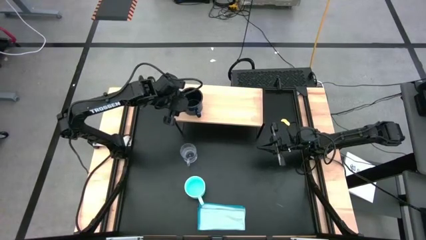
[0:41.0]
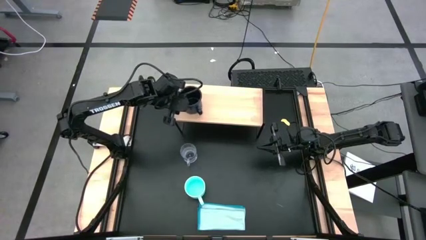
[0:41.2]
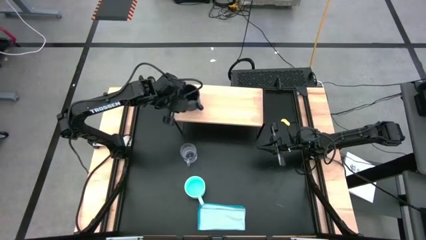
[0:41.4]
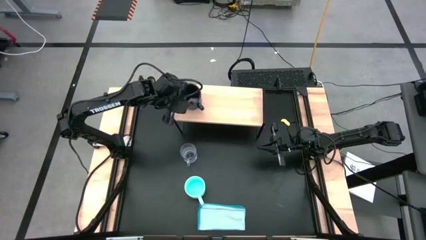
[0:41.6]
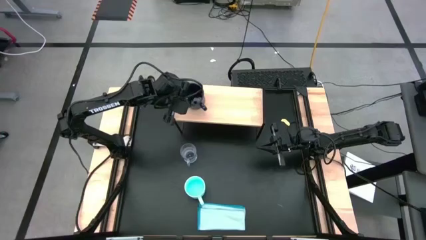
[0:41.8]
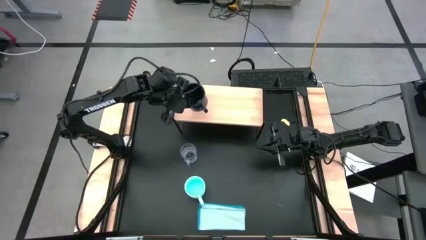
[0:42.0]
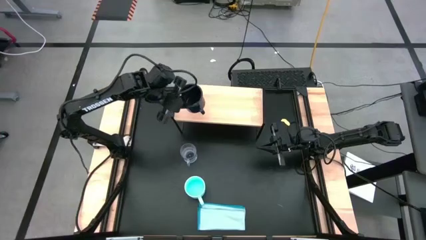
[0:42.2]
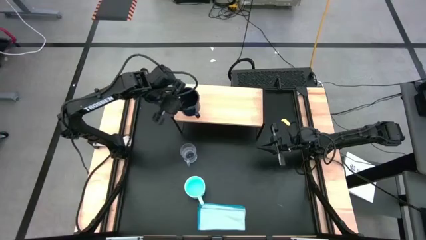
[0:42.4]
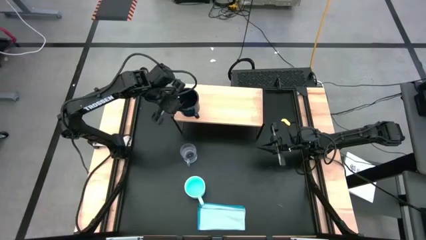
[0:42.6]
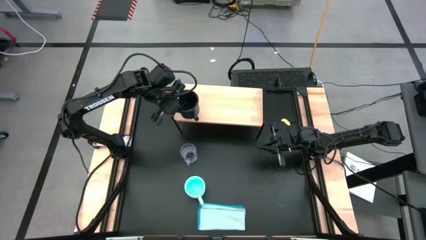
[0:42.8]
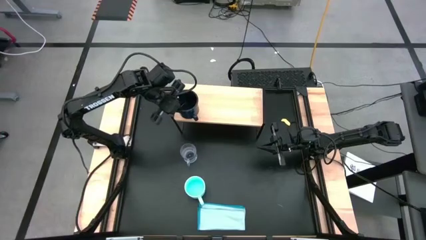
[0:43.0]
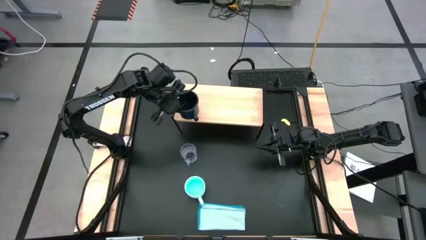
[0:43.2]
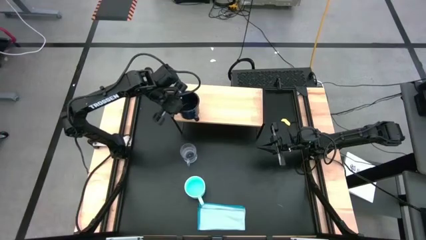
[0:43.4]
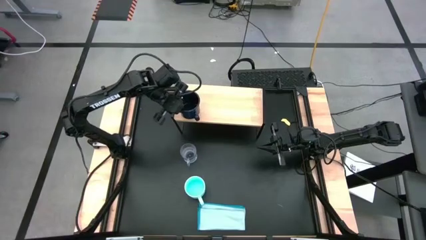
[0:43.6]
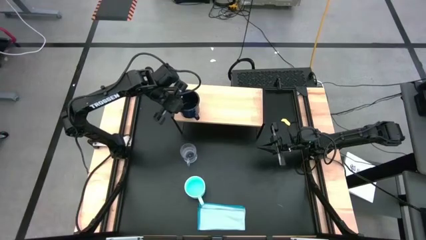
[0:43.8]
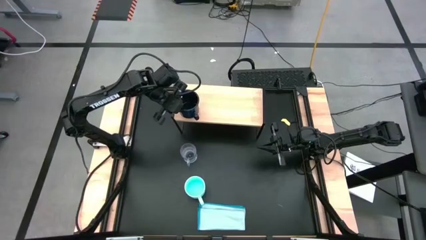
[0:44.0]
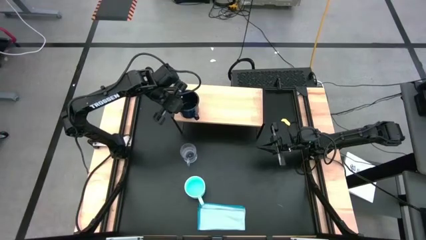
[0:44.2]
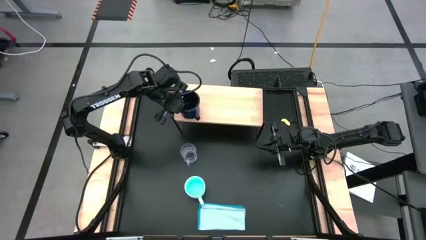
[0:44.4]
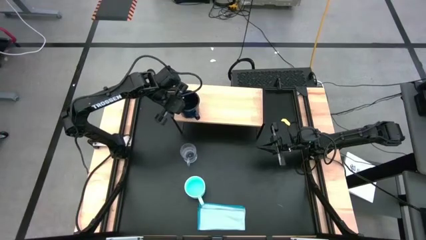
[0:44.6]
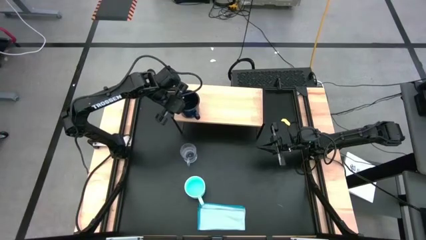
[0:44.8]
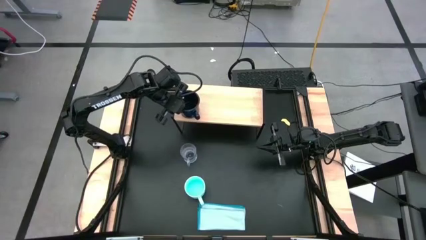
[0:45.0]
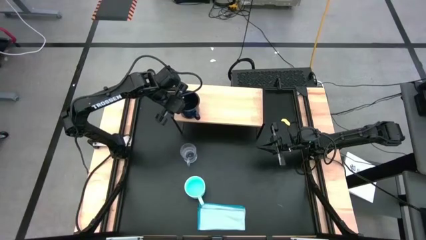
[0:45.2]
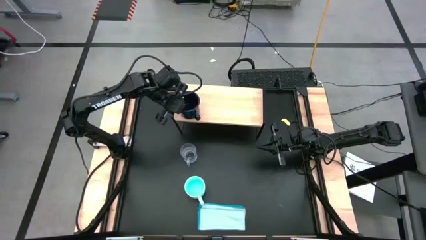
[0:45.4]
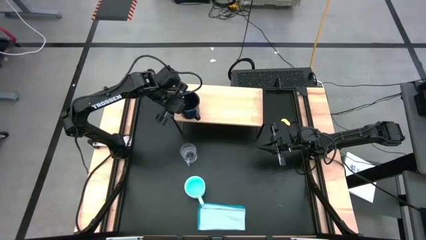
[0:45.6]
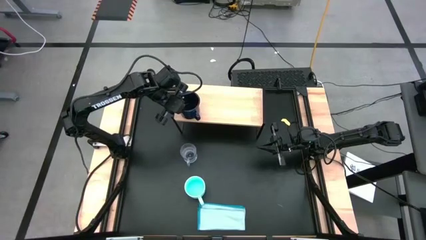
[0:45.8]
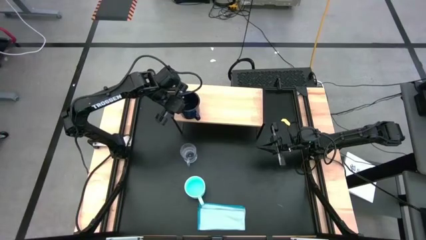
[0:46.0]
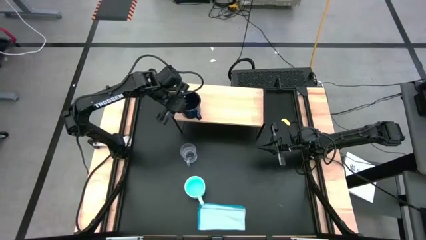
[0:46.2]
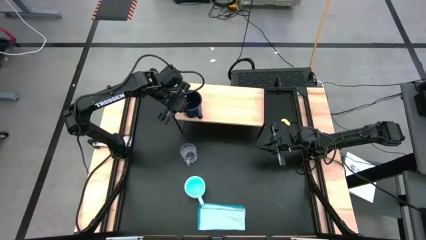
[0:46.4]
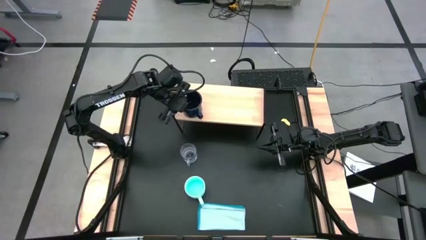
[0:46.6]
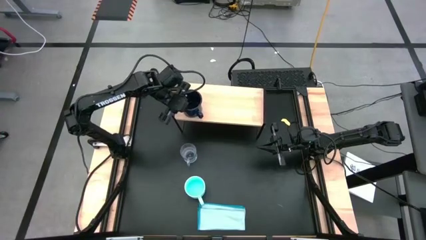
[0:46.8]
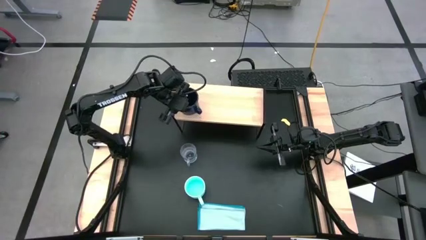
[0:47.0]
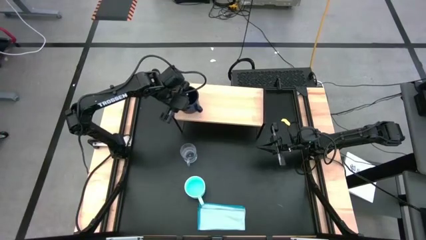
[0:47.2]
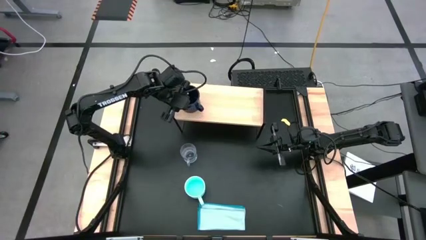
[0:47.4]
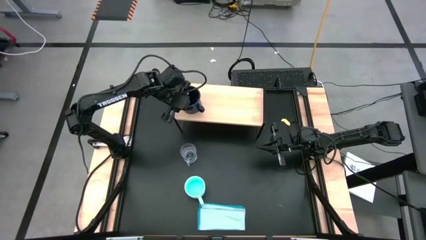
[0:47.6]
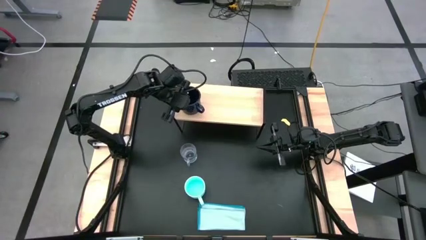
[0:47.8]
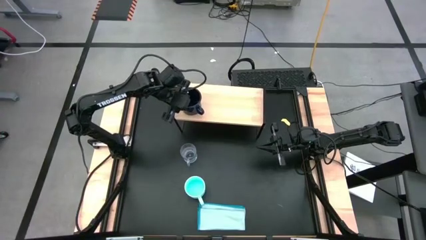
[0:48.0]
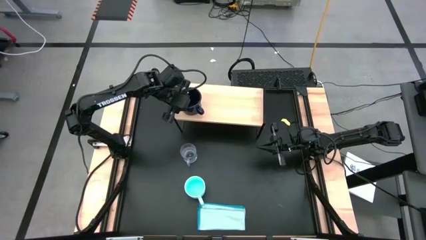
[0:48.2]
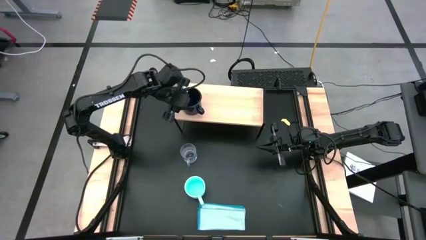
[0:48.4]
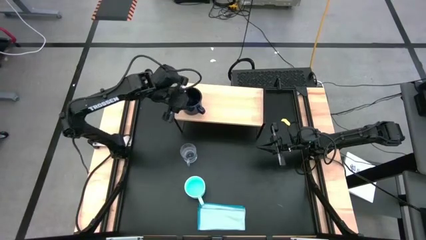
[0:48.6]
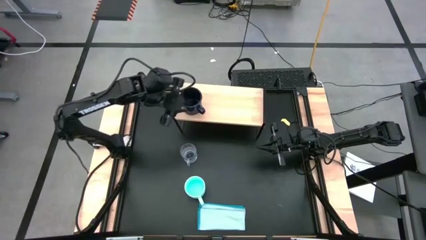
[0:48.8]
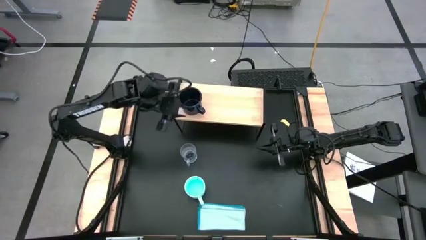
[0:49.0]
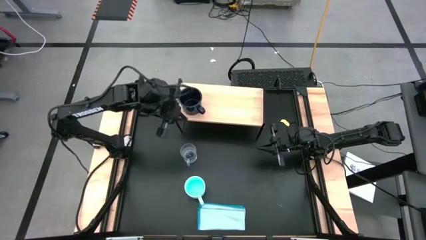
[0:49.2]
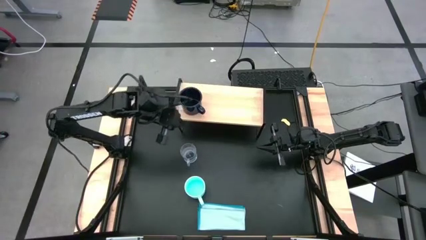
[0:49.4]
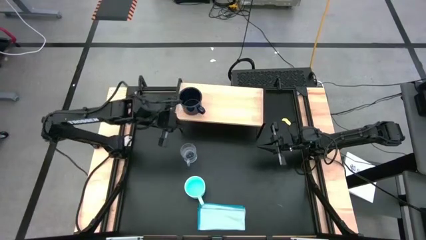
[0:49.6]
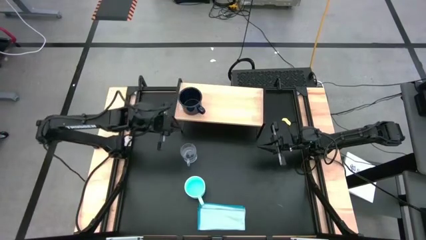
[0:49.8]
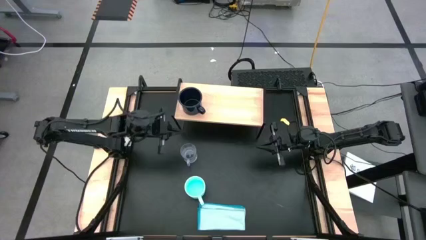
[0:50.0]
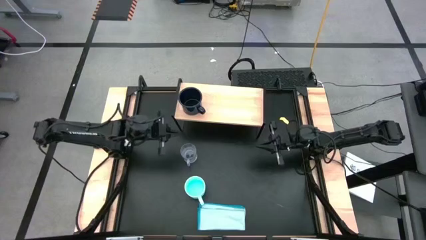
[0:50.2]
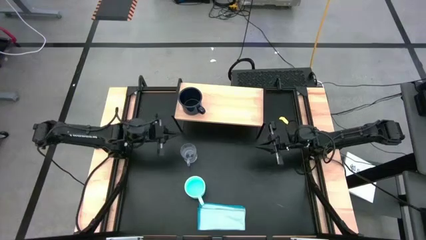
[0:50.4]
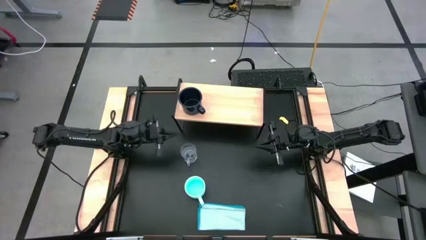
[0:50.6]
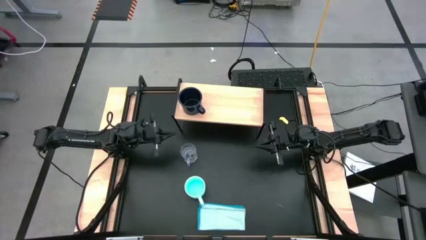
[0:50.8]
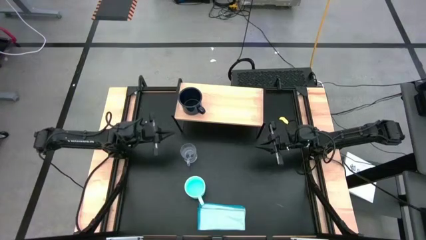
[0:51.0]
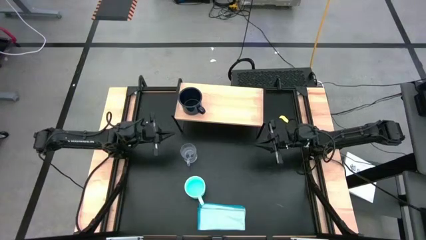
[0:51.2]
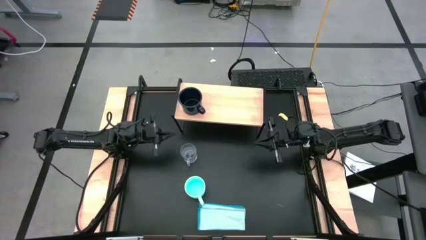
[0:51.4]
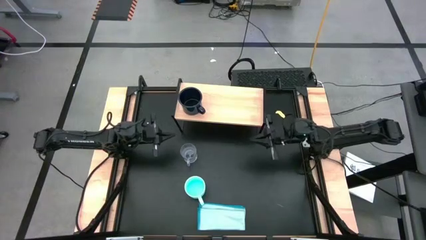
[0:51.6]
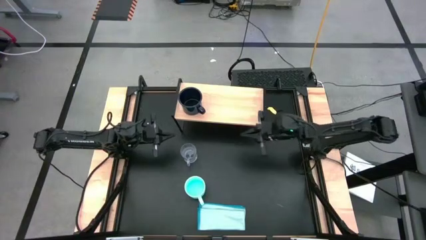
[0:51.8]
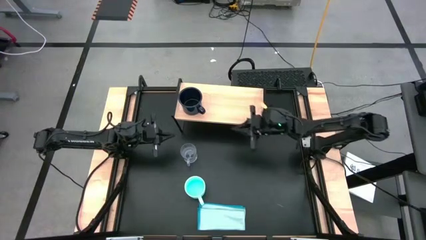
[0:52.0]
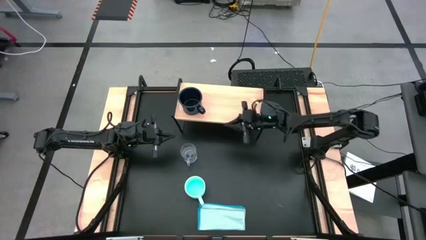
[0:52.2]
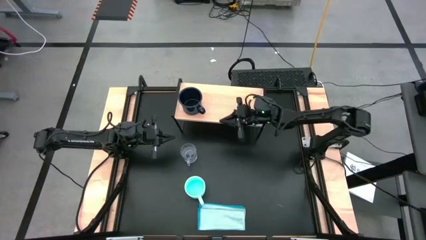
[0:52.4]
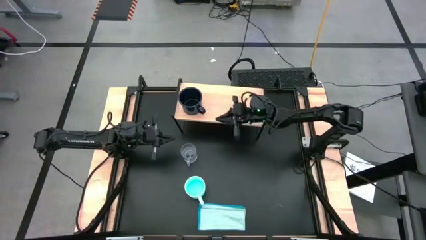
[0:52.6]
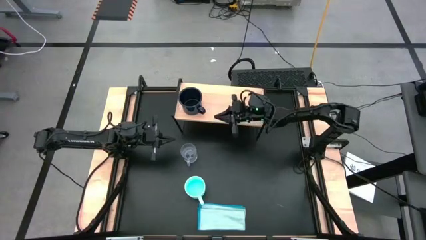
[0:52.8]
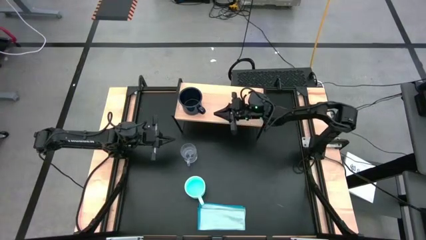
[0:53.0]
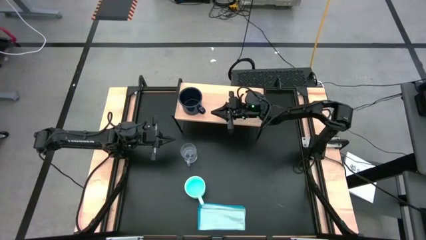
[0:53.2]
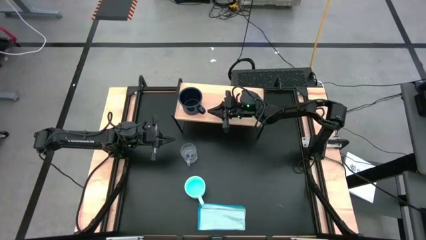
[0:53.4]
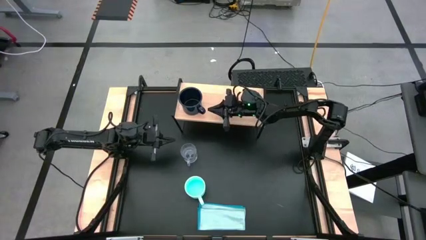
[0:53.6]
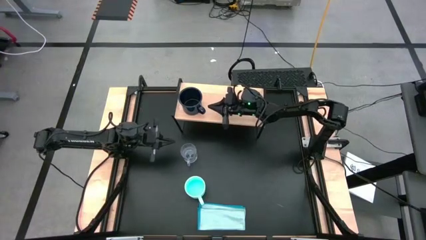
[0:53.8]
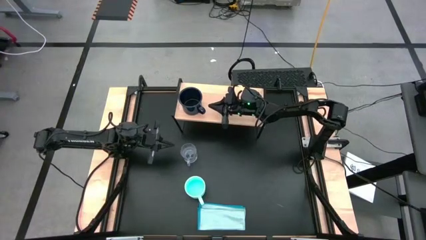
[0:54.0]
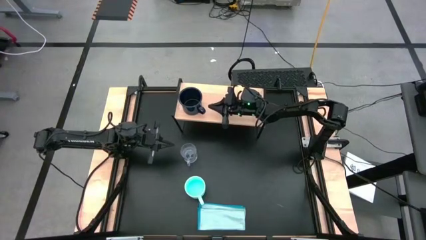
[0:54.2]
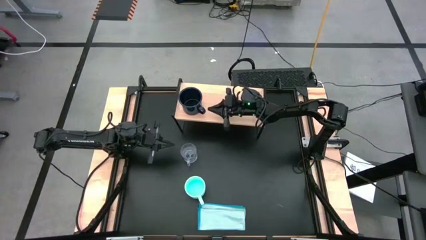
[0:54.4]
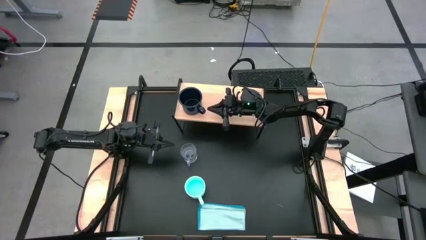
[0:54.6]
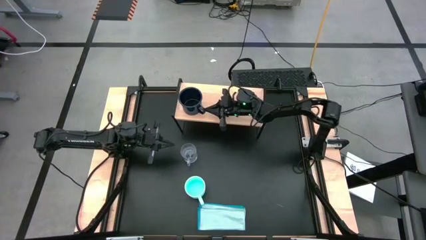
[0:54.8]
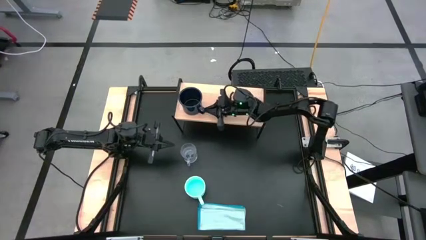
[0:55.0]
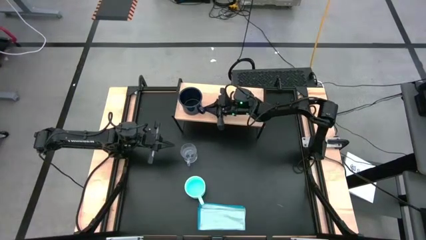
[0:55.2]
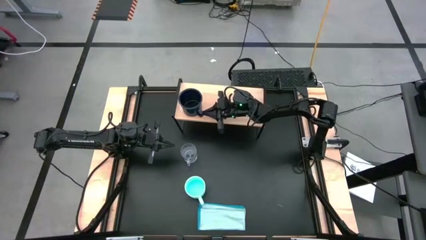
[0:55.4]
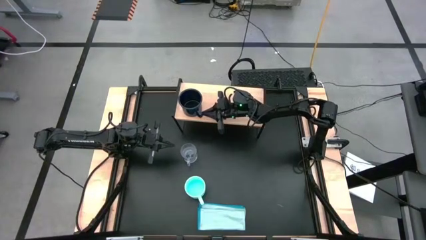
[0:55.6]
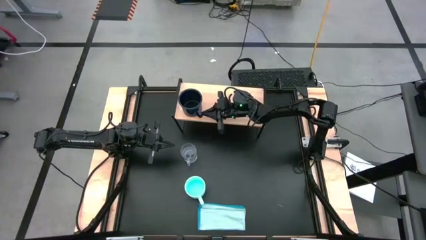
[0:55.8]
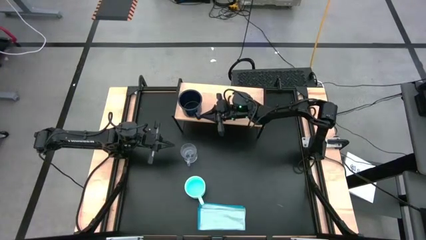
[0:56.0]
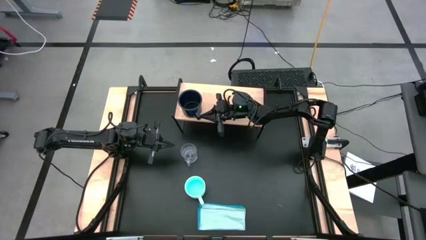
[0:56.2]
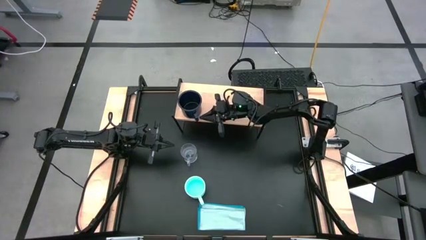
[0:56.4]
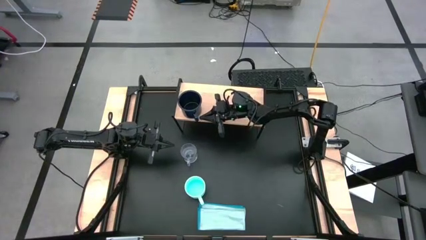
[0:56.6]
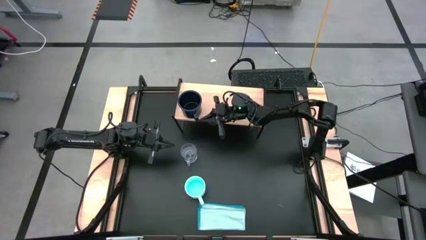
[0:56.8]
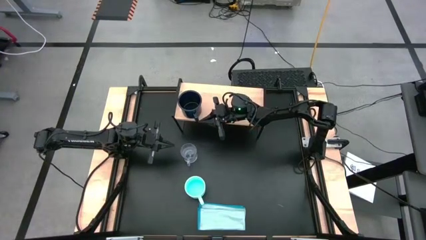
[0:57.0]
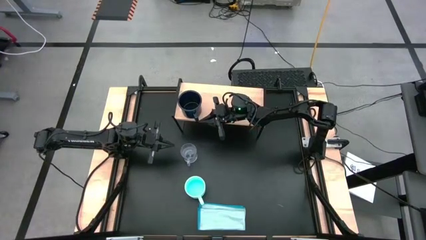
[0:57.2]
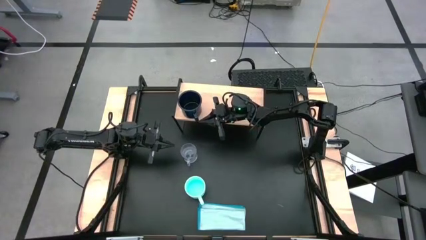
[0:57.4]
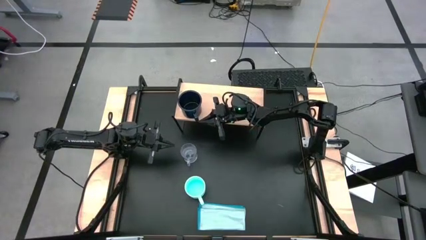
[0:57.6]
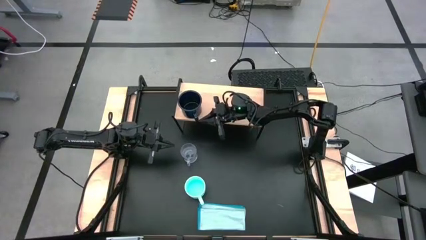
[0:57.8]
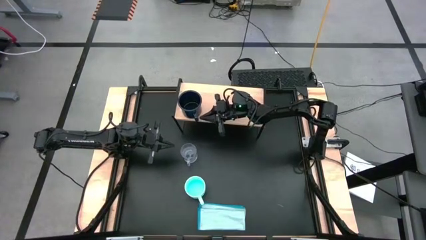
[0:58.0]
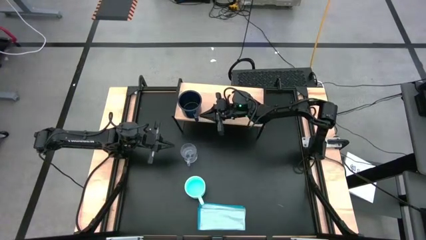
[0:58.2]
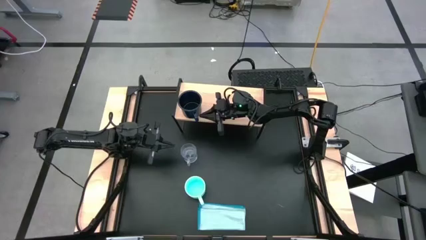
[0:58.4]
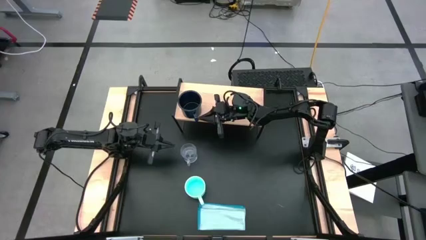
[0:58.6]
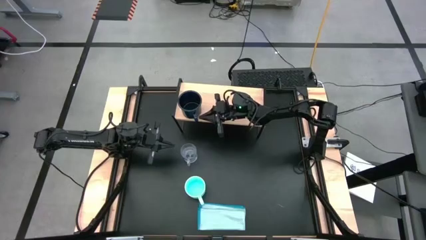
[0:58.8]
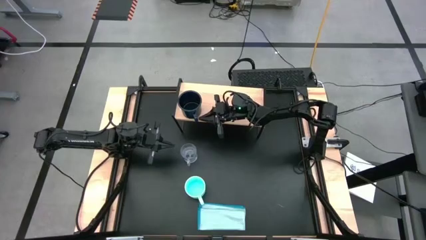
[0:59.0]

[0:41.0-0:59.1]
Task: Stack small to large cups/mugs on shelf
Put the dark blue mug on the shelf
